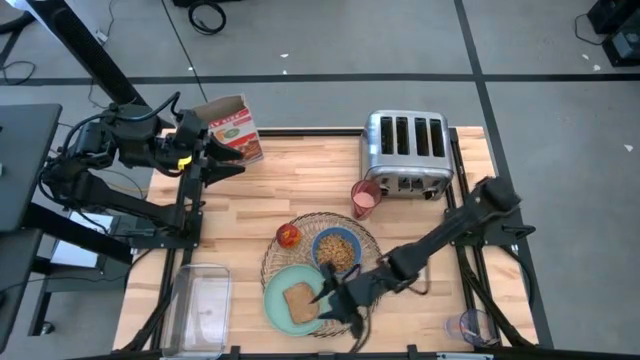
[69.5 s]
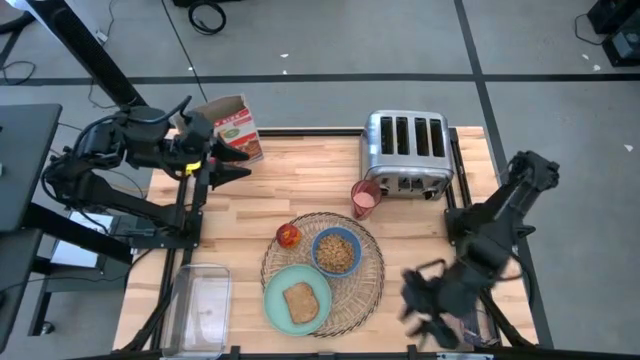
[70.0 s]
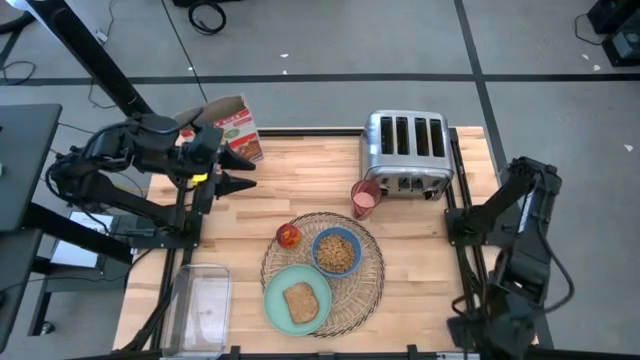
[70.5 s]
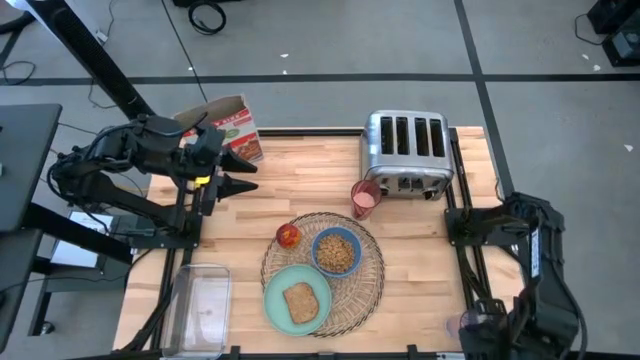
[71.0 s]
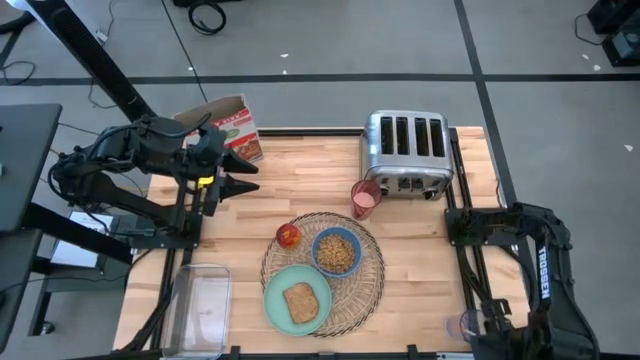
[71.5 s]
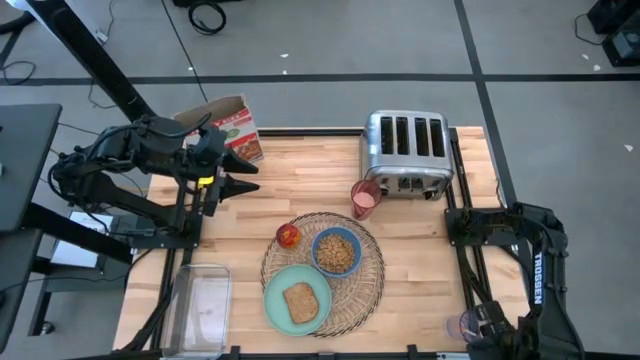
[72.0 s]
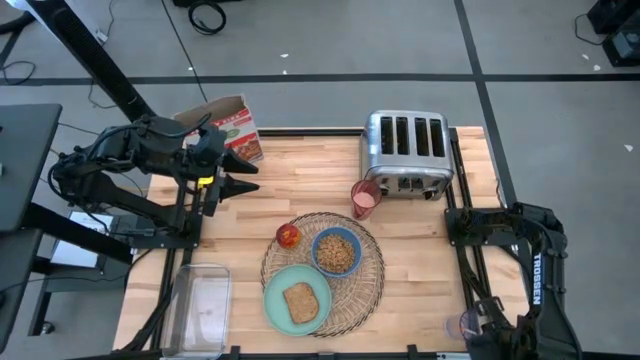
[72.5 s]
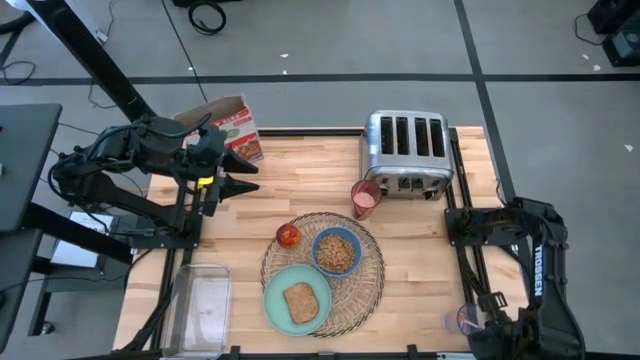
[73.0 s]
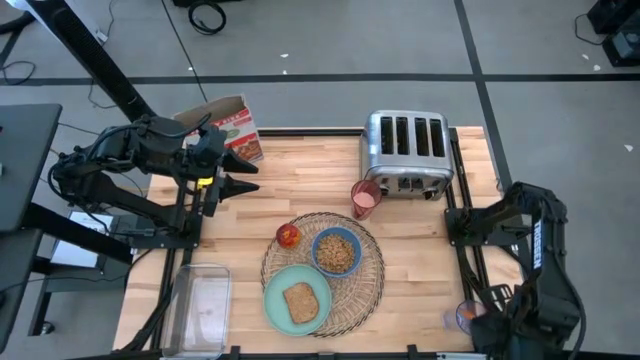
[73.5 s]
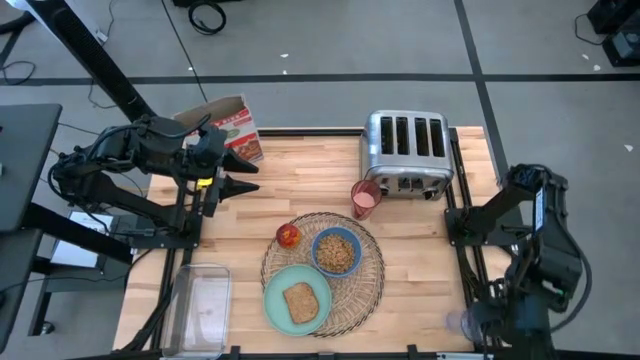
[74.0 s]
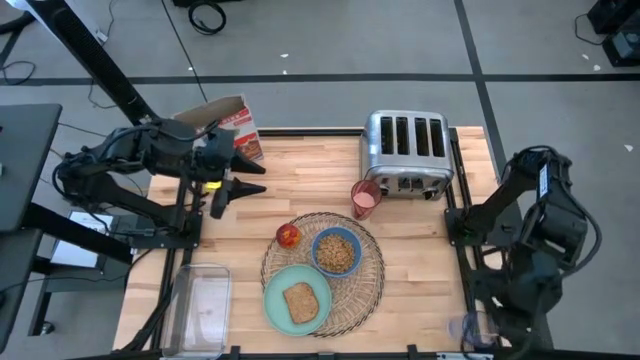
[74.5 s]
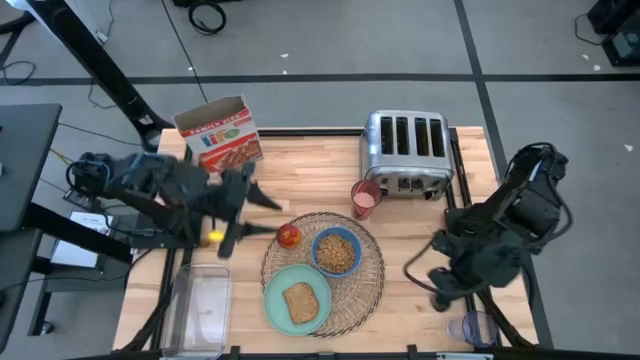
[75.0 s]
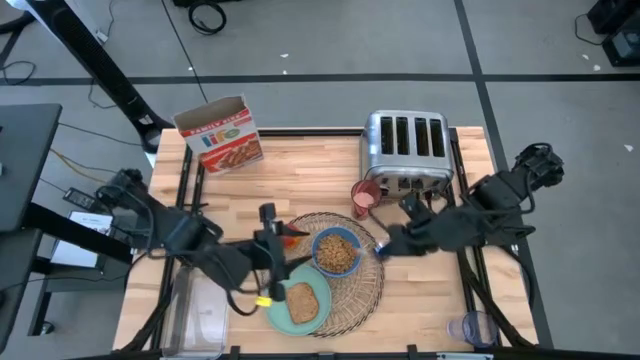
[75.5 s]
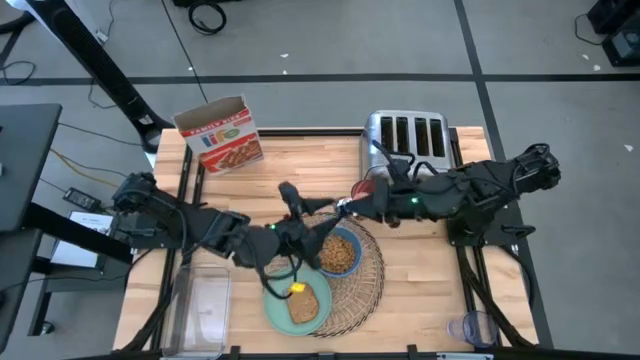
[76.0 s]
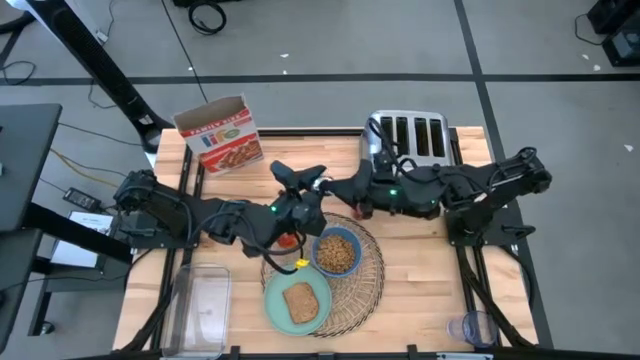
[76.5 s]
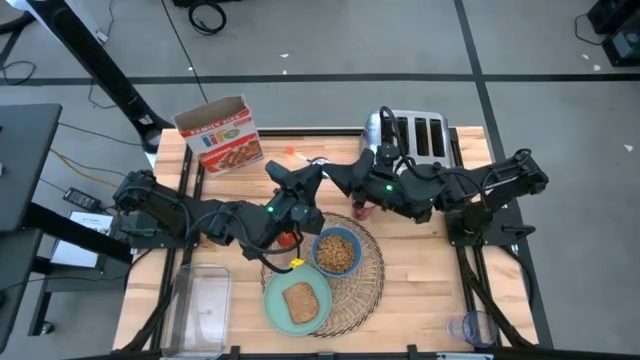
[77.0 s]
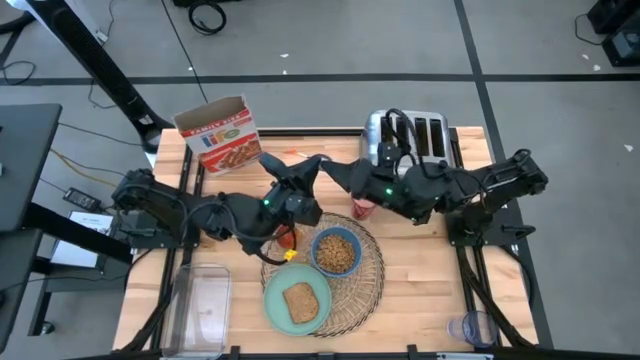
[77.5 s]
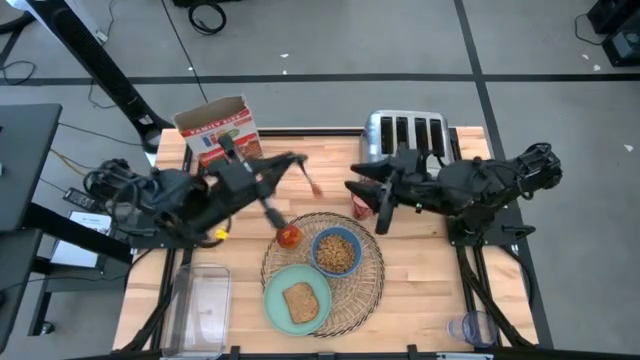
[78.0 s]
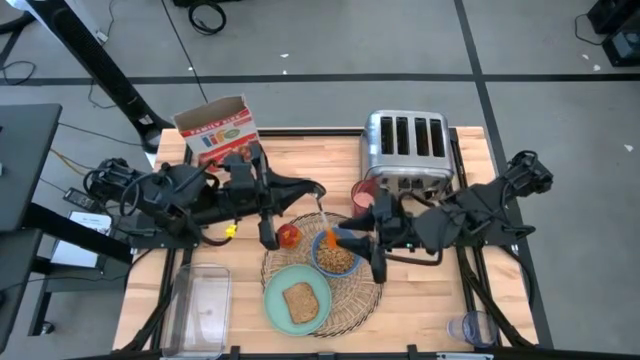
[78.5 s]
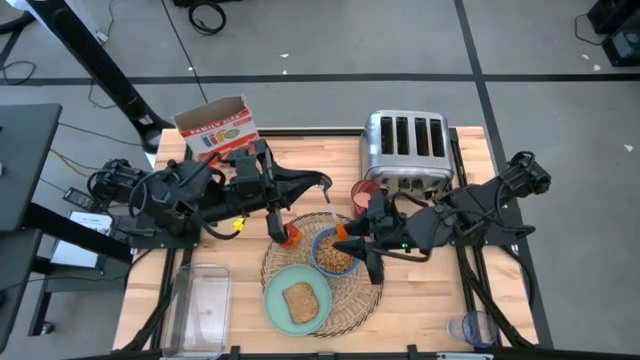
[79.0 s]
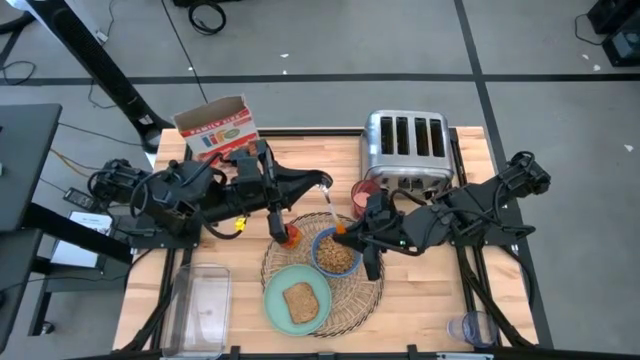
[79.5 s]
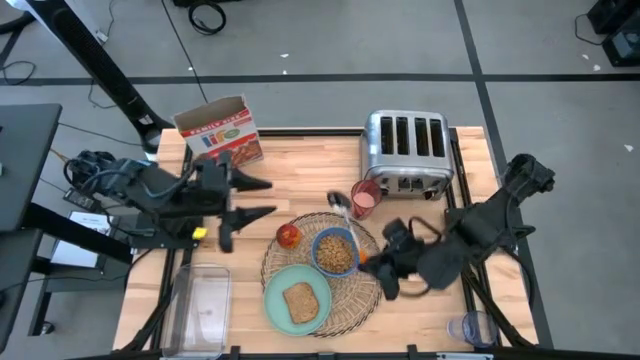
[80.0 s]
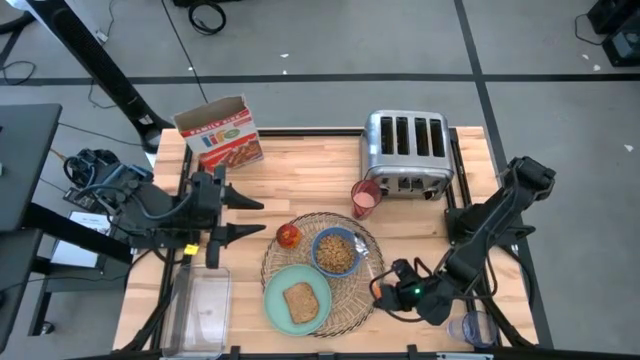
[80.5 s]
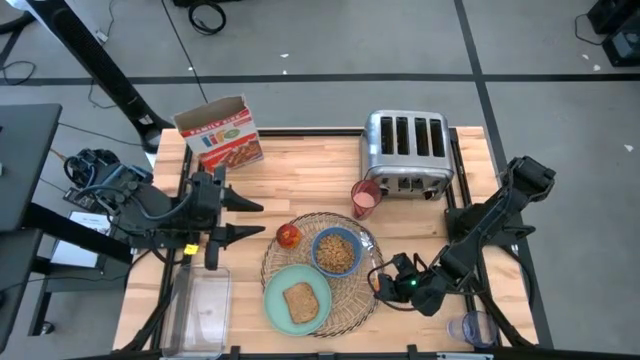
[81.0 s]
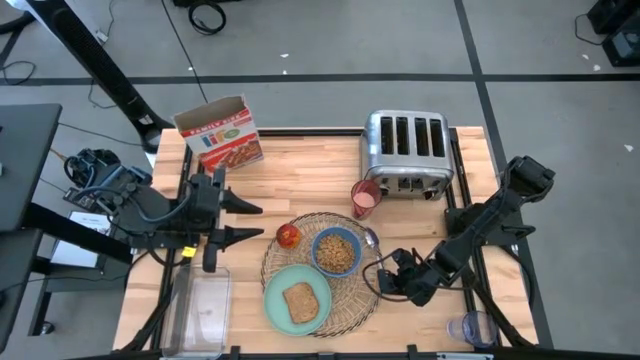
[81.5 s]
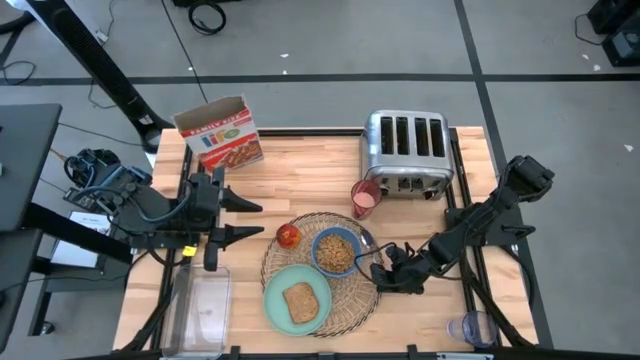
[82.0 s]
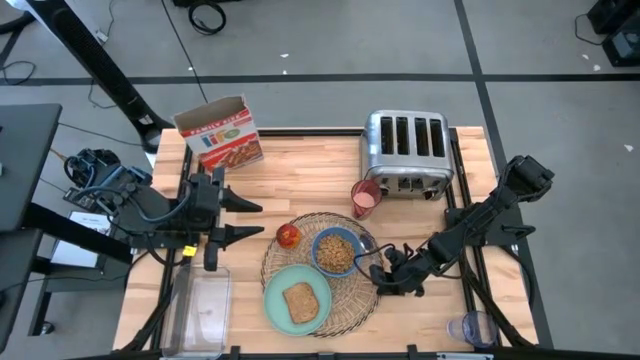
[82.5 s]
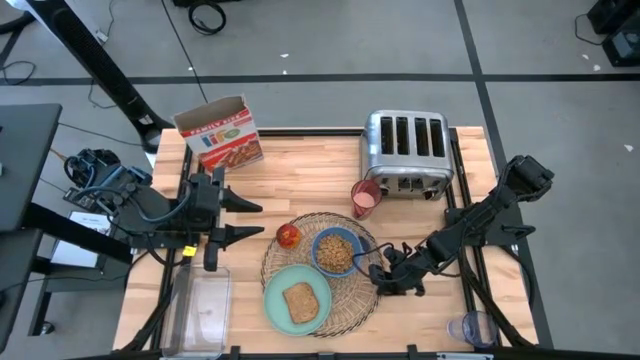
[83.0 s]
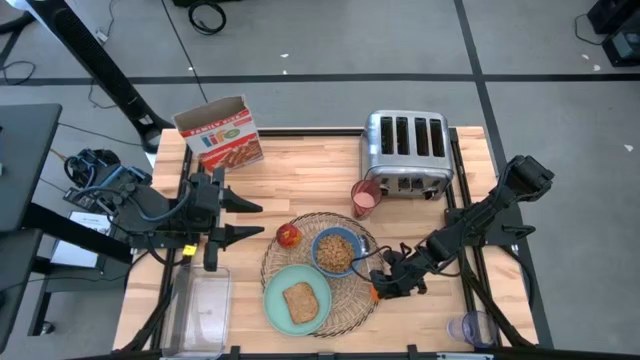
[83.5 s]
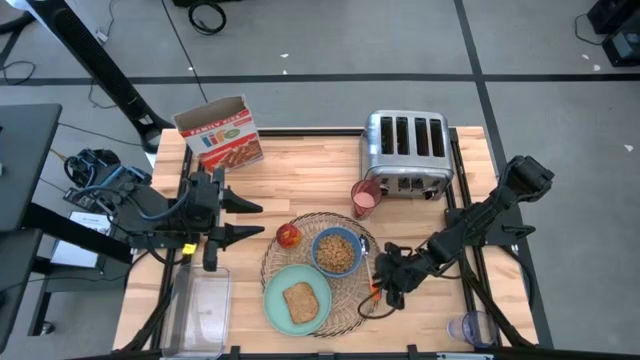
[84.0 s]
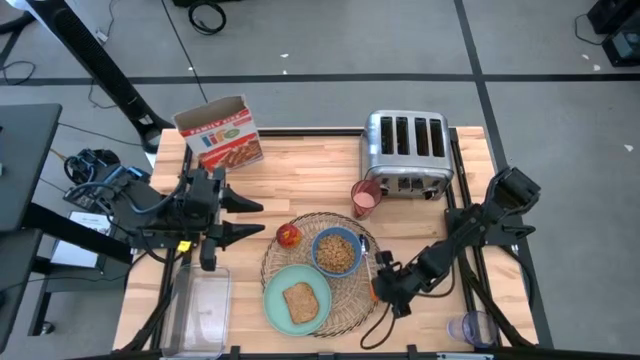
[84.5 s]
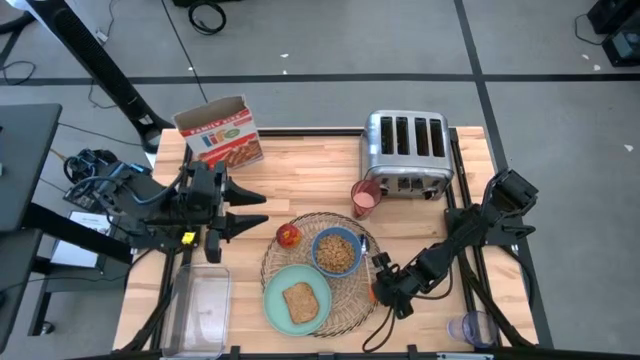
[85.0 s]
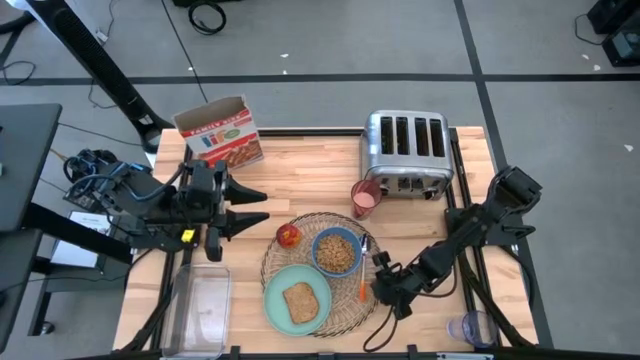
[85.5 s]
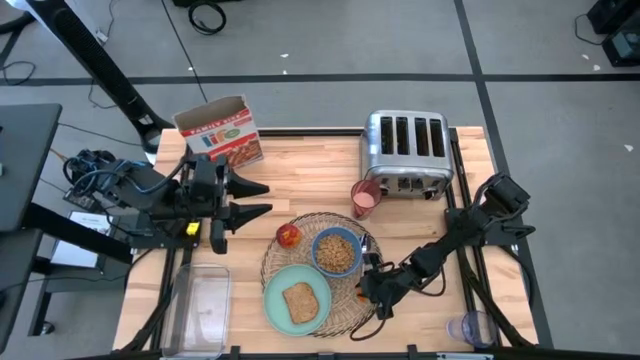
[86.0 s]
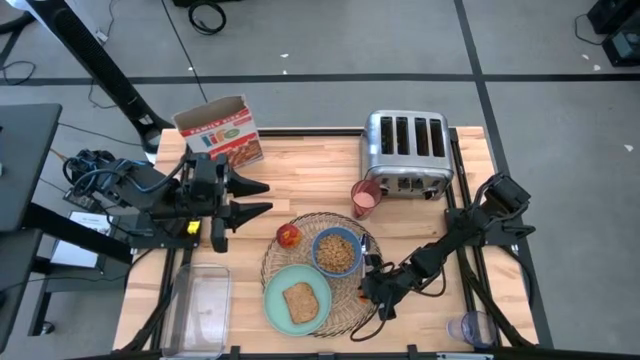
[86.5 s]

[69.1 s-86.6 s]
Task: Arrange a breakfast setting
Put the orange spoon on the brown tablemat to the right of the blue bowl

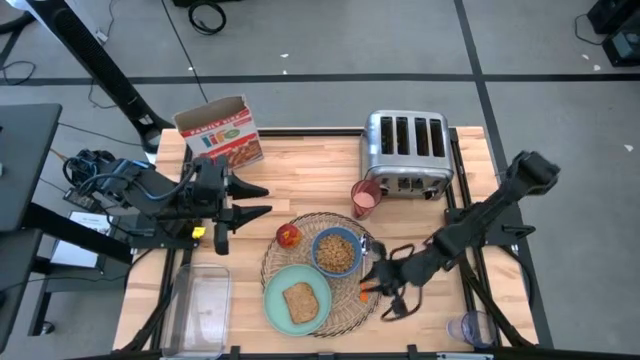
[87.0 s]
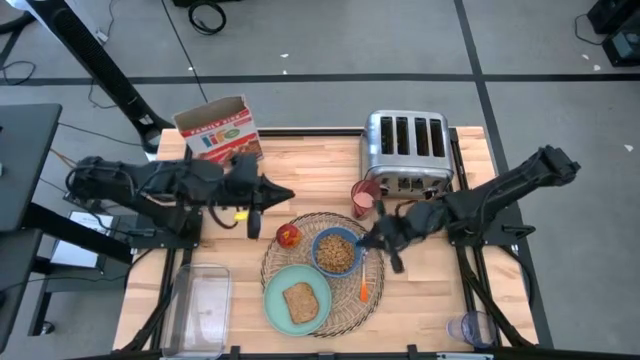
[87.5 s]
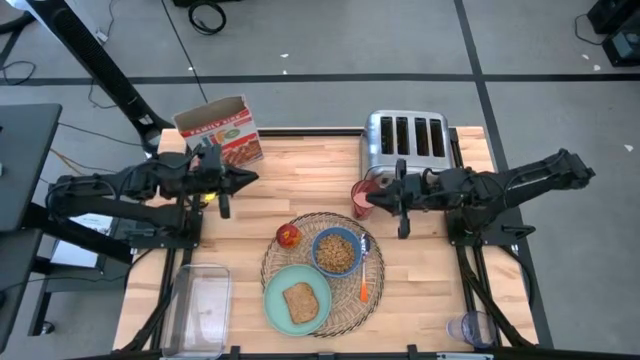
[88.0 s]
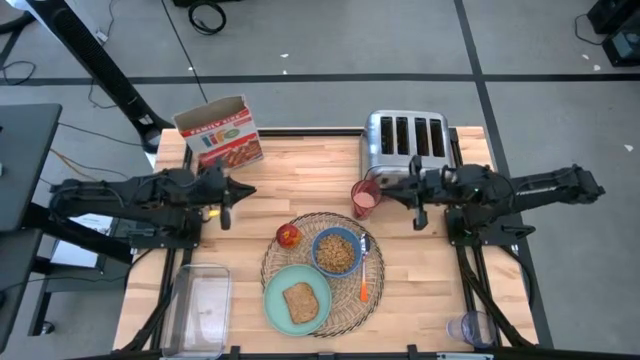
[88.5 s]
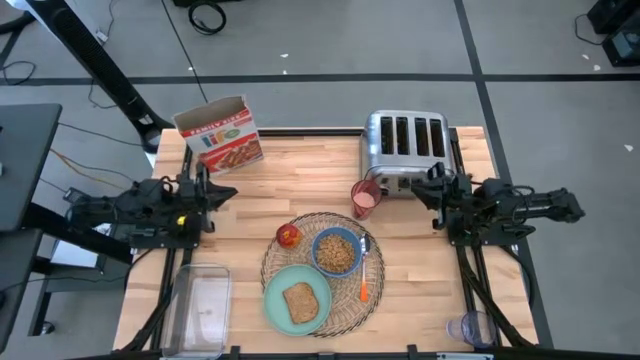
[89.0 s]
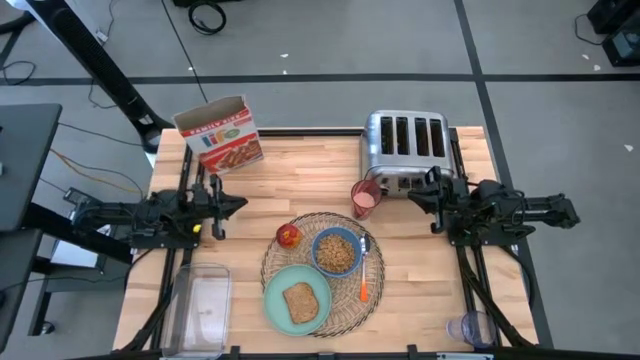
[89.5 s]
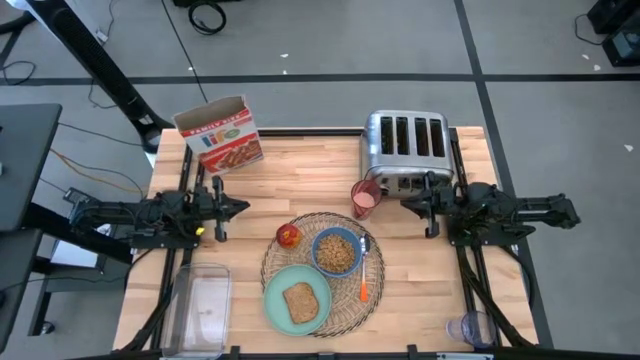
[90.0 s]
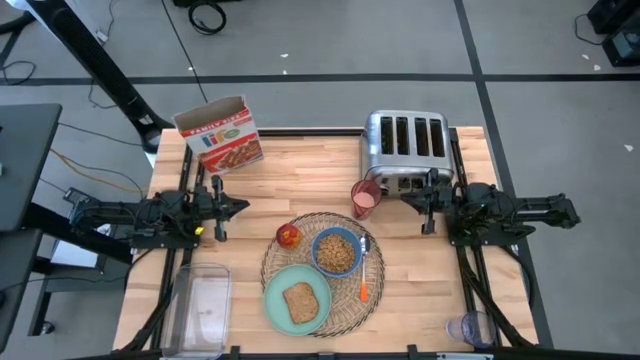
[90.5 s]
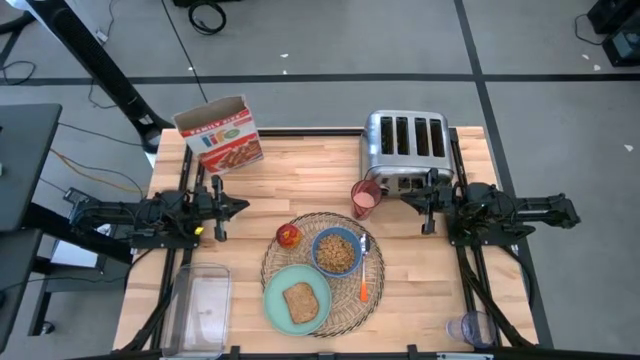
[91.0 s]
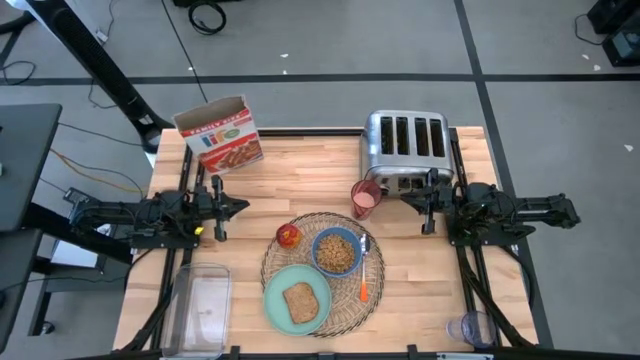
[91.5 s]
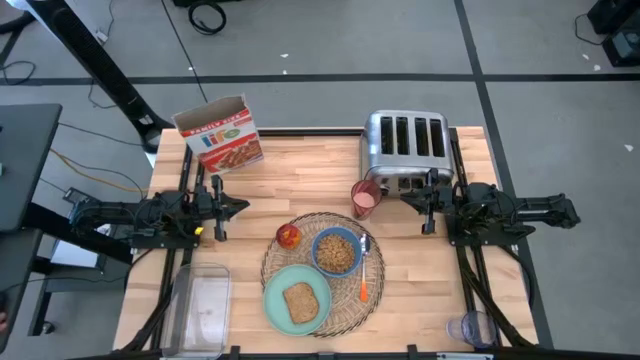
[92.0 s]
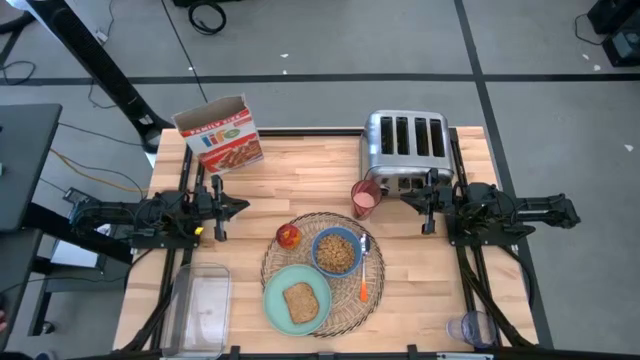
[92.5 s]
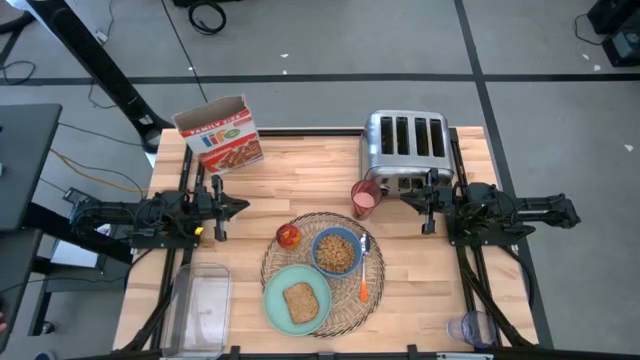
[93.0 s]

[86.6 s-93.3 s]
Return to Home Position
